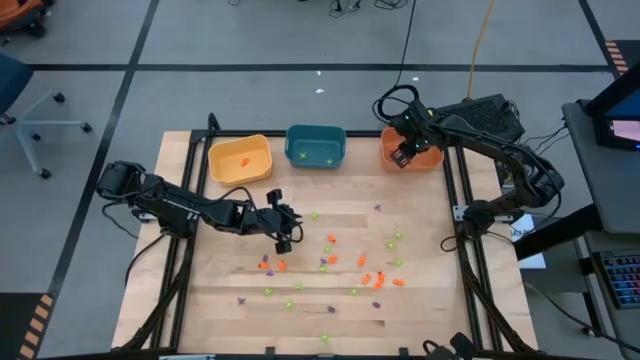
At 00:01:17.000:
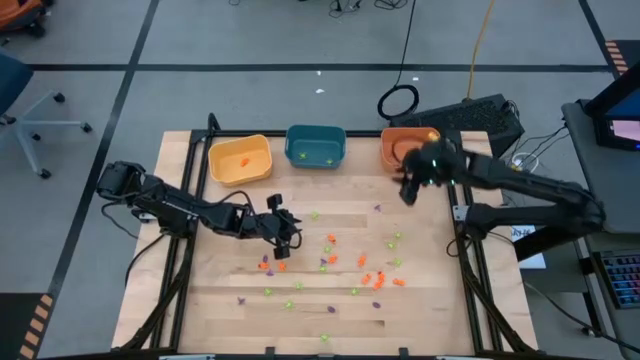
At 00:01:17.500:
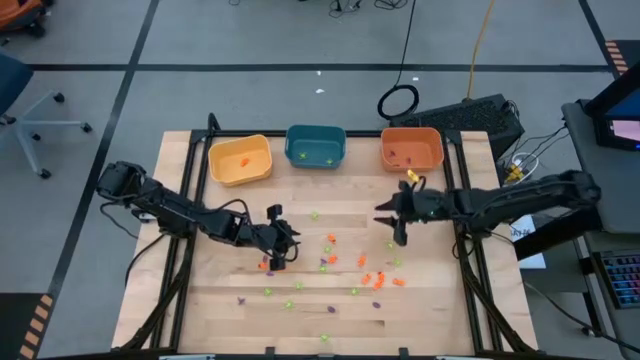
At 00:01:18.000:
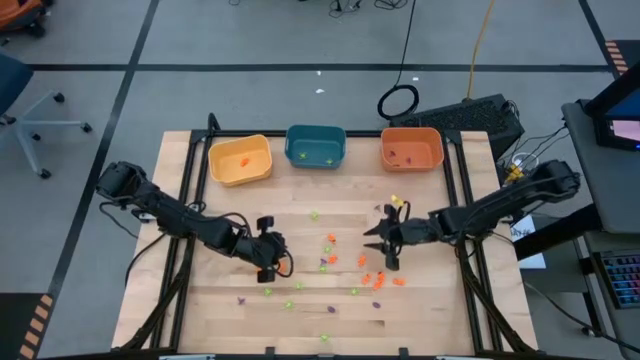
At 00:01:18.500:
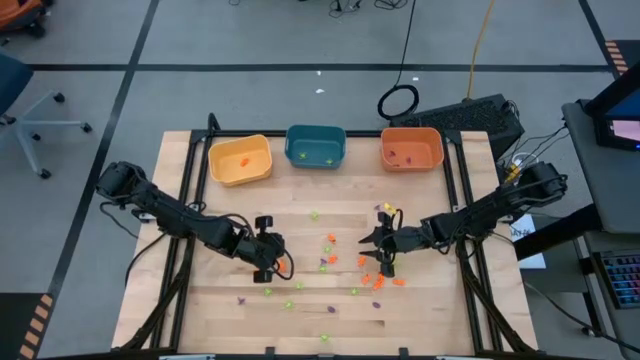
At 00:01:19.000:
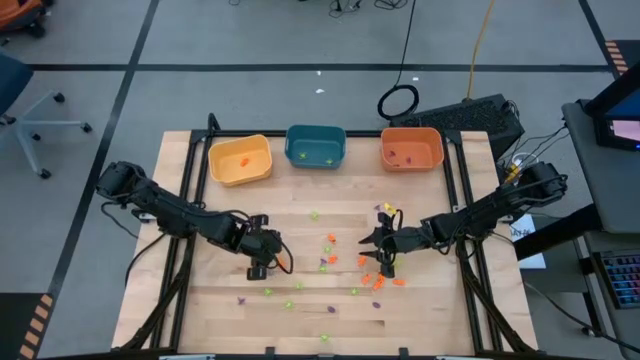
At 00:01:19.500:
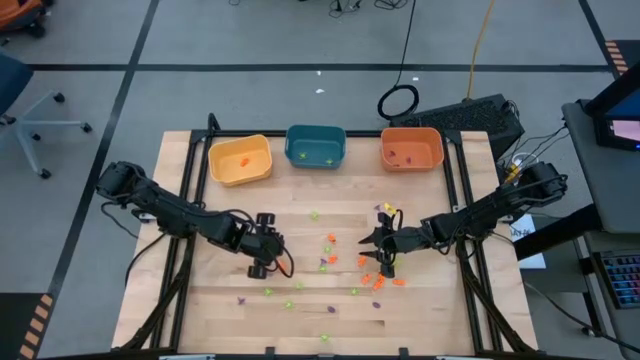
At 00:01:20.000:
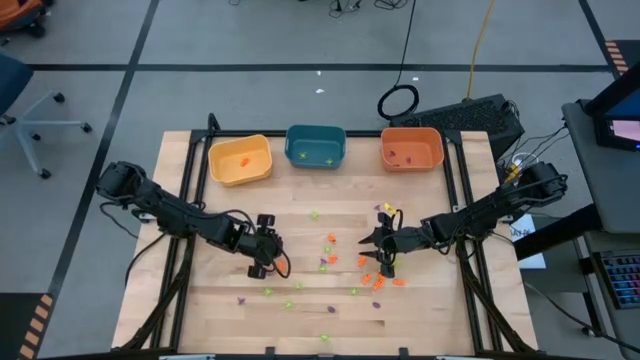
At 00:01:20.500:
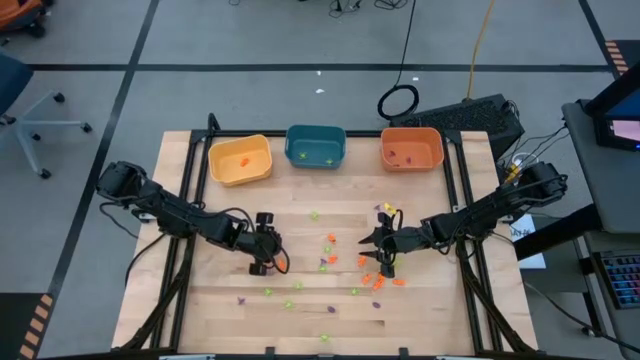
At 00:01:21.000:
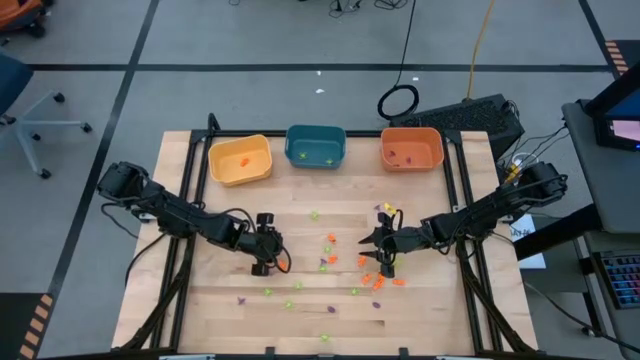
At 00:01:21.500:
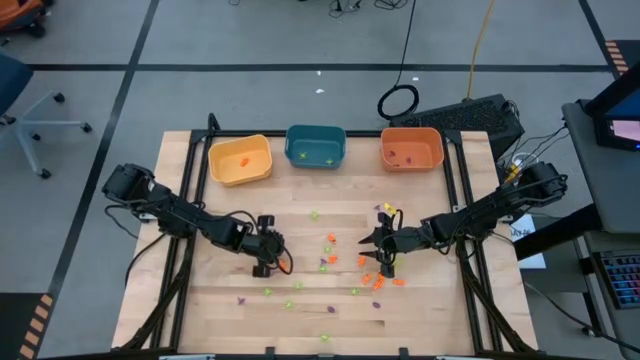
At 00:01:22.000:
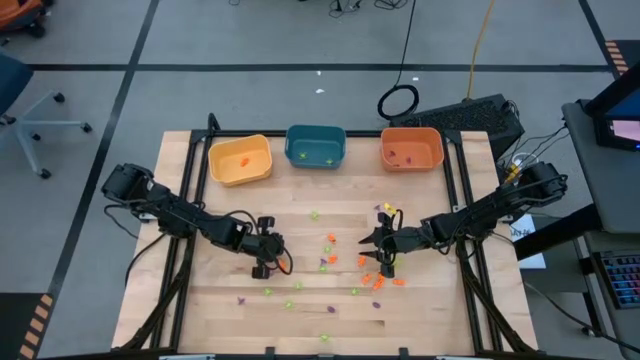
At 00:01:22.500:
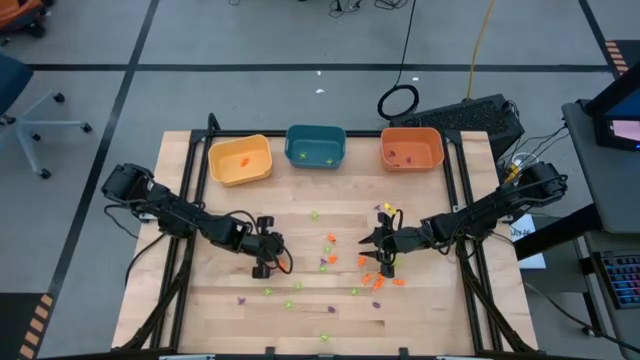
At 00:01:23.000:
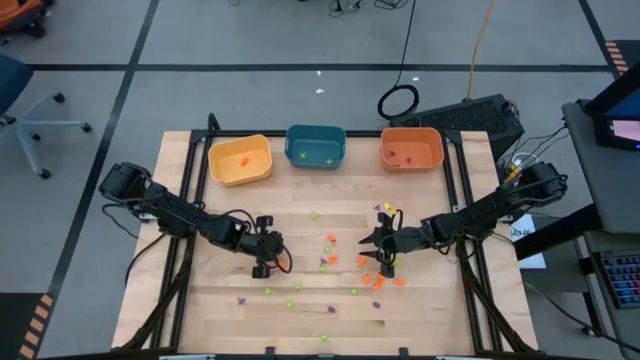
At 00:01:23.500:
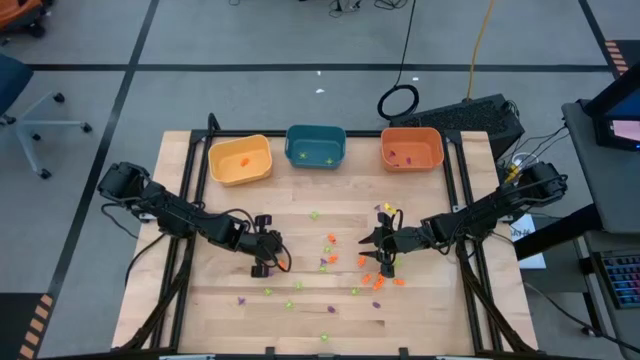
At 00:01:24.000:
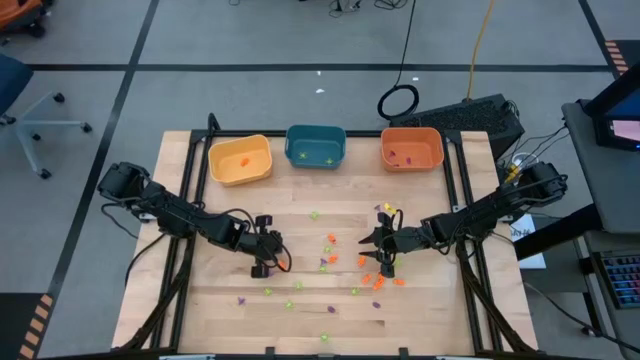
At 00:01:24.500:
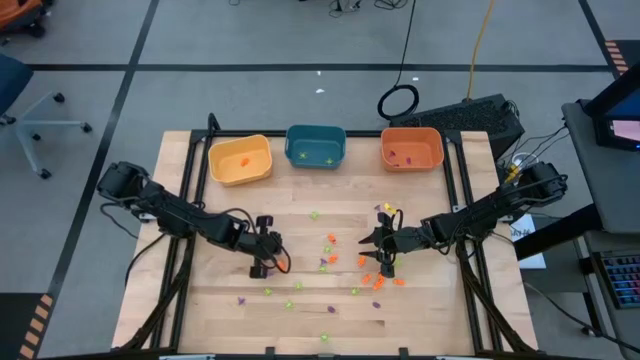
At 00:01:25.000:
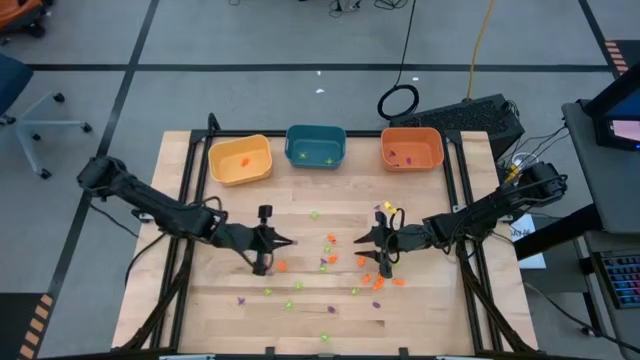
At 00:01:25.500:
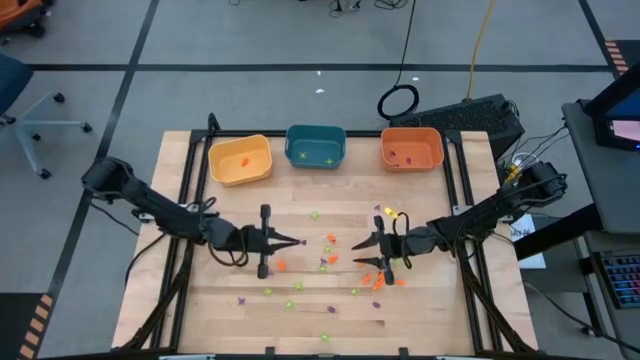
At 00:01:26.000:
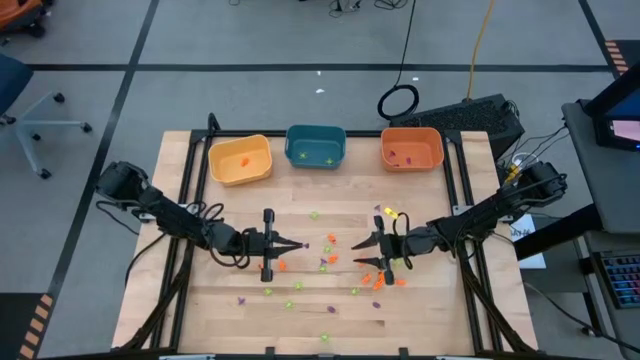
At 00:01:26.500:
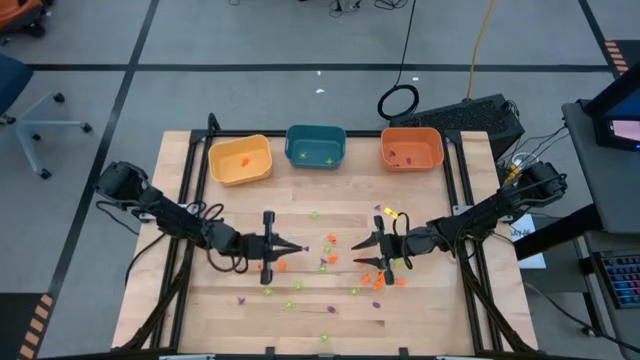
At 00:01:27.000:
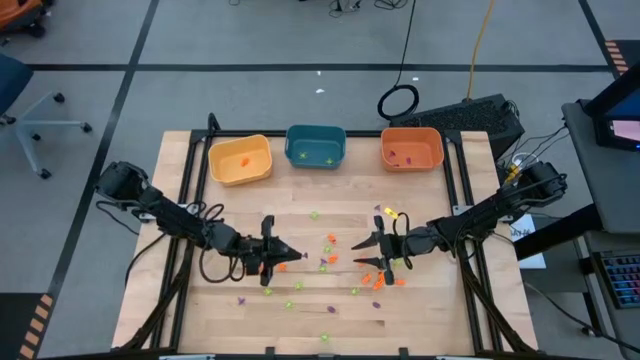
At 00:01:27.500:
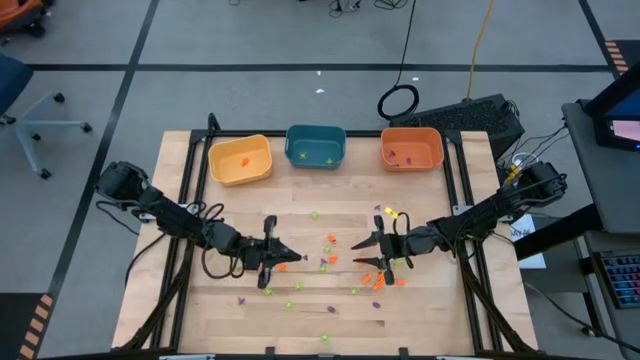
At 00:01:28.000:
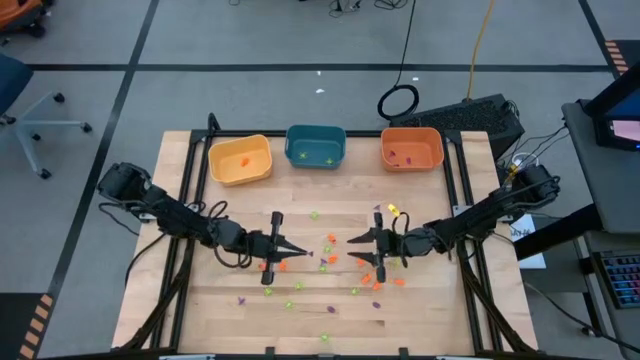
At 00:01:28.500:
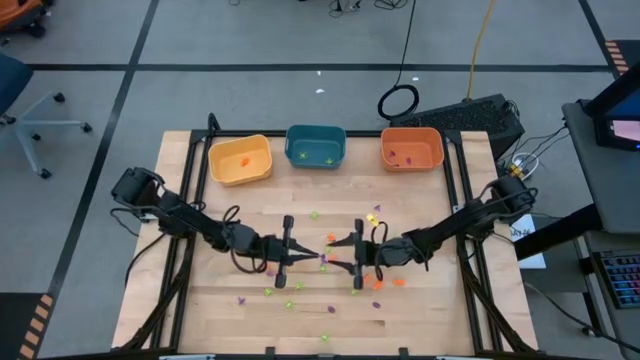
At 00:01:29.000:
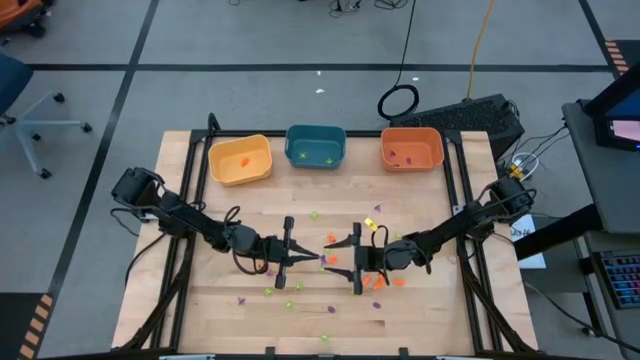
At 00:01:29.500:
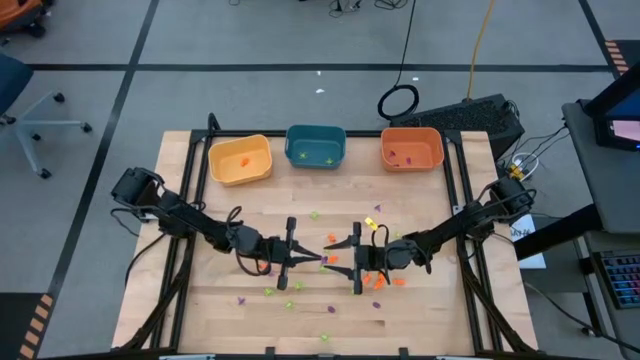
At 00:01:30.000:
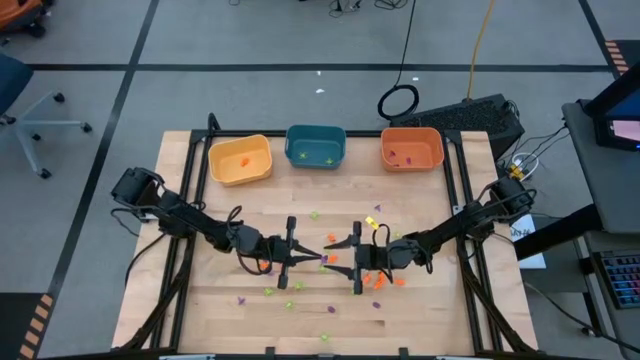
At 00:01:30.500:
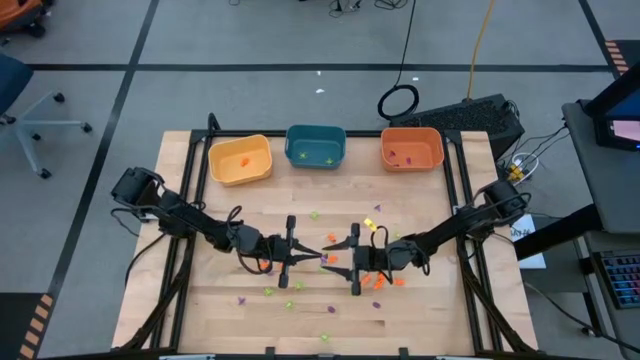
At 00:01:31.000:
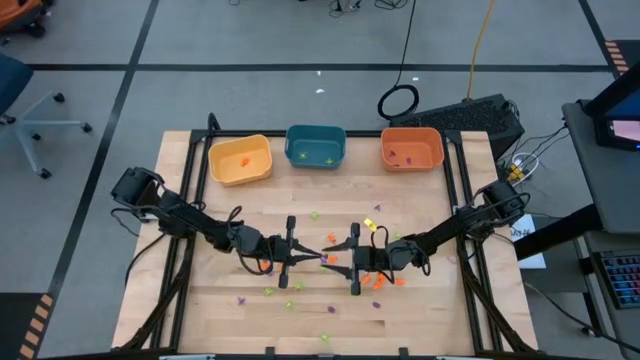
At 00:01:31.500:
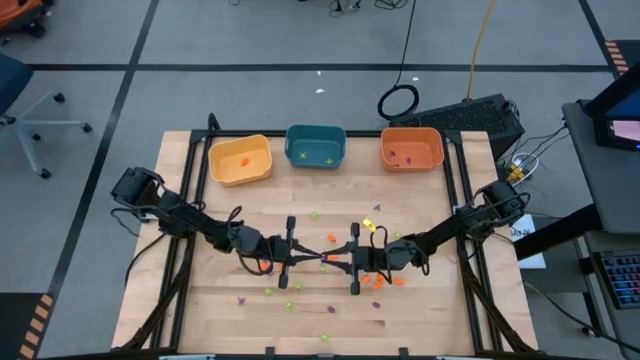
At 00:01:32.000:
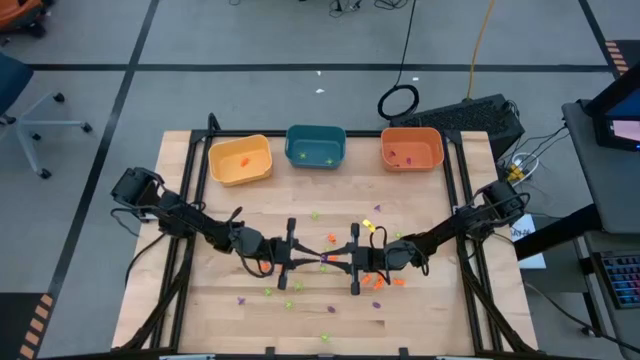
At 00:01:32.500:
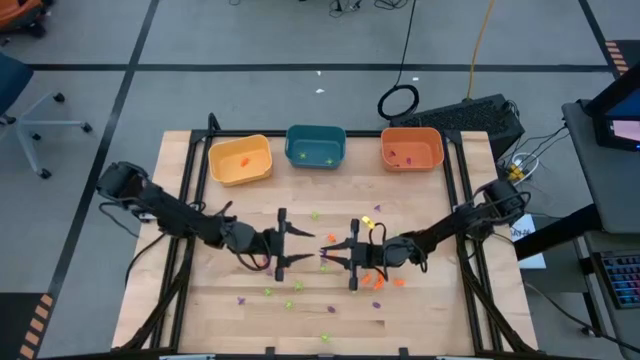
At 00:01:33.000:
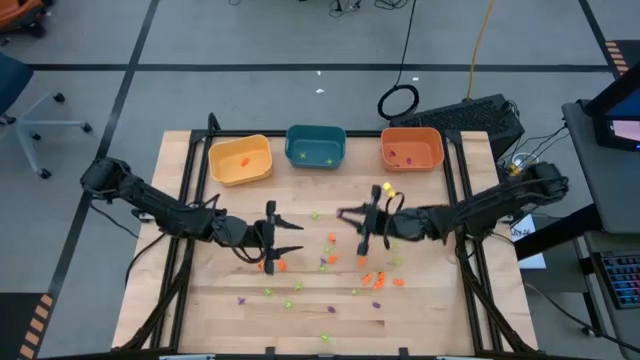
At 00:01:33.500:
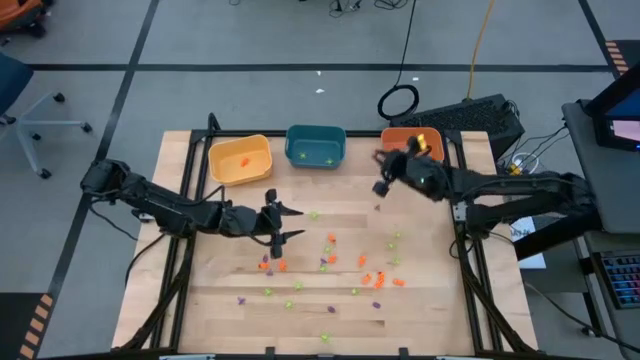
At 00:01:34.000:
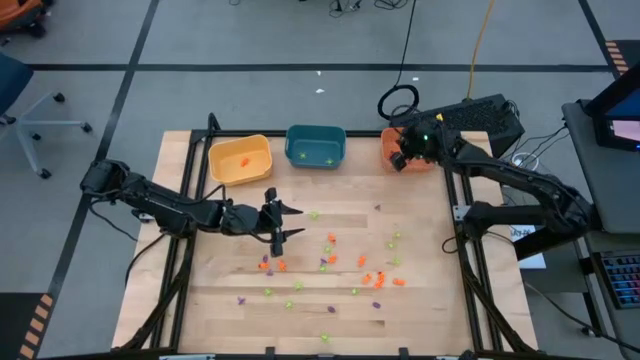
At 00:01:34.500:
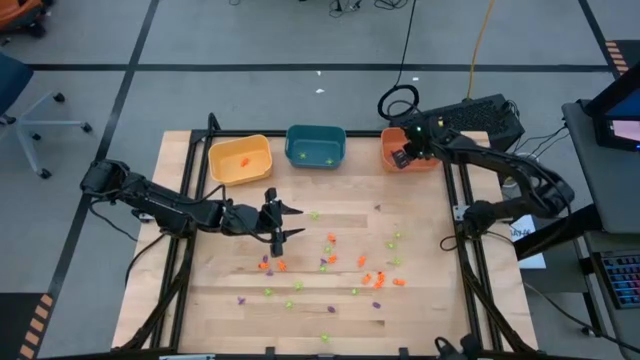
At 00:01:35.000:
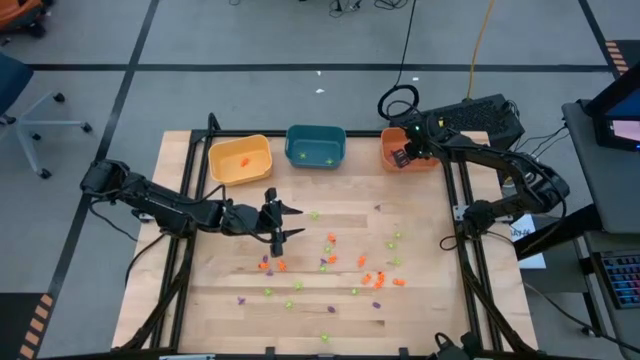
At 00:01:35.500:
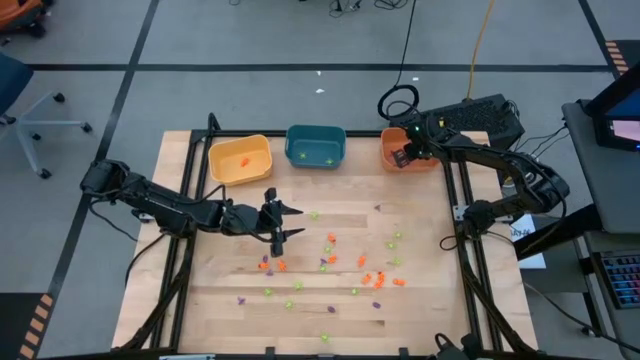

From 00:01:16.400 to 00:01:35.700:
Task: Sort Halloween decoration
Put the violet witch hat toy into the orange bin
